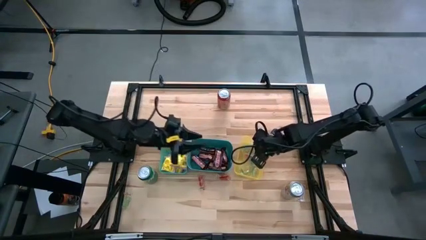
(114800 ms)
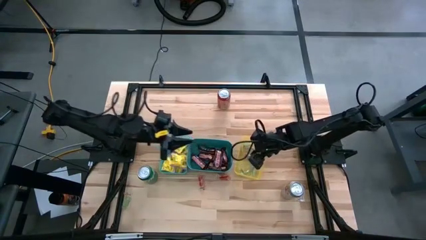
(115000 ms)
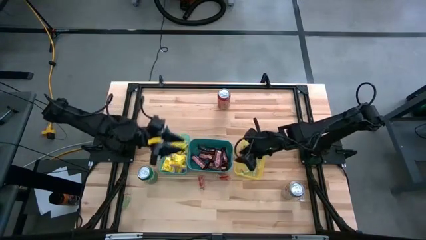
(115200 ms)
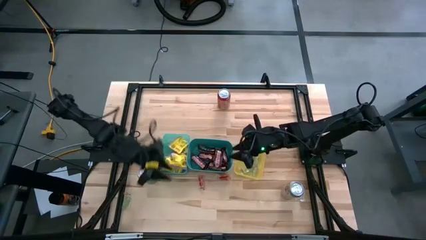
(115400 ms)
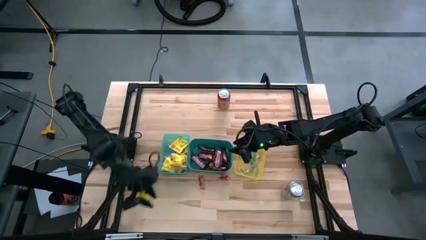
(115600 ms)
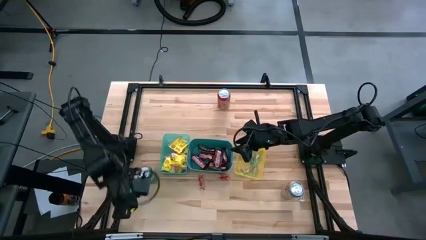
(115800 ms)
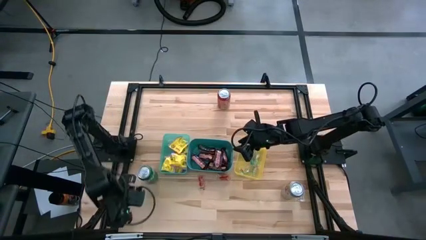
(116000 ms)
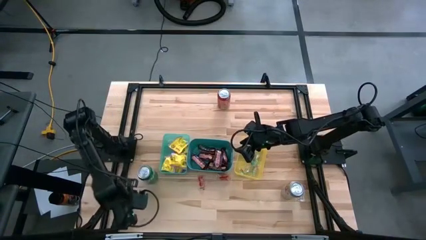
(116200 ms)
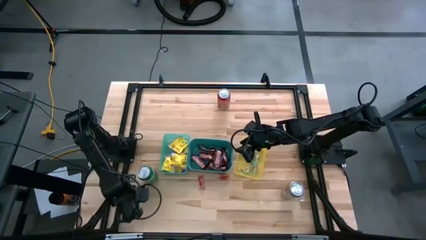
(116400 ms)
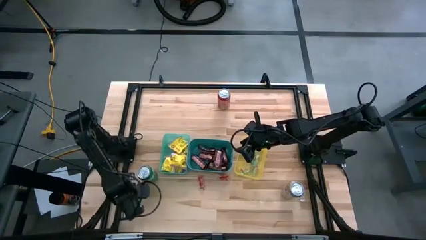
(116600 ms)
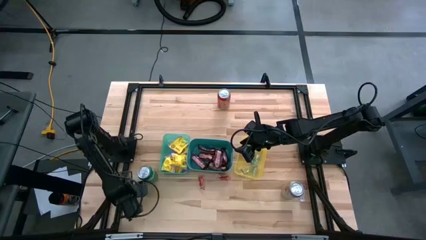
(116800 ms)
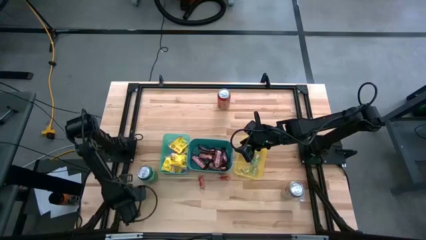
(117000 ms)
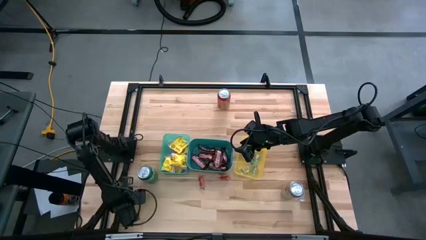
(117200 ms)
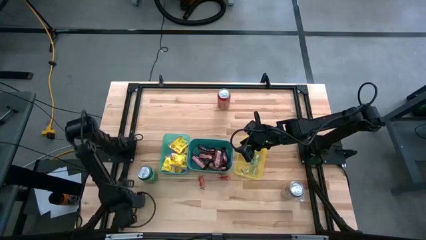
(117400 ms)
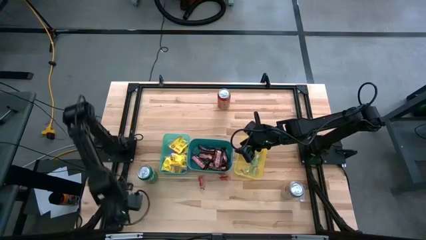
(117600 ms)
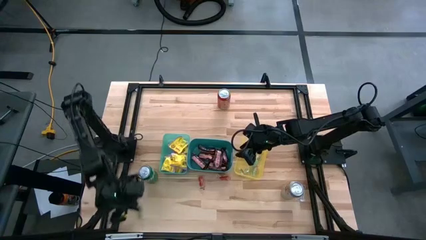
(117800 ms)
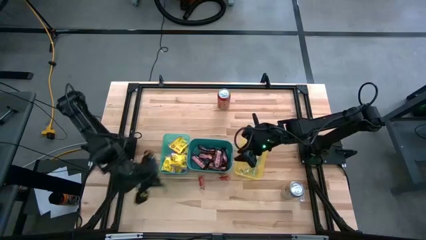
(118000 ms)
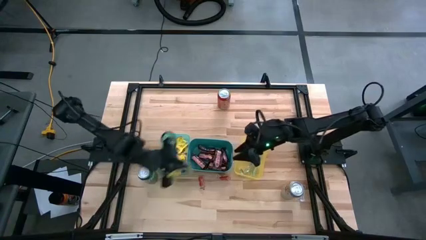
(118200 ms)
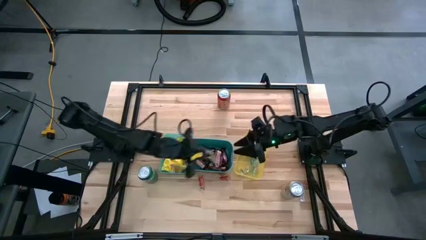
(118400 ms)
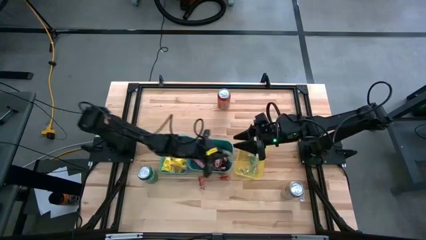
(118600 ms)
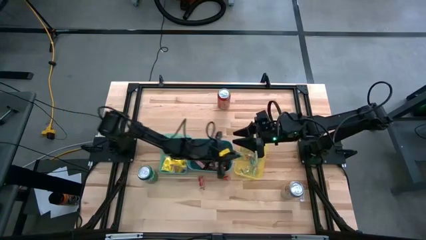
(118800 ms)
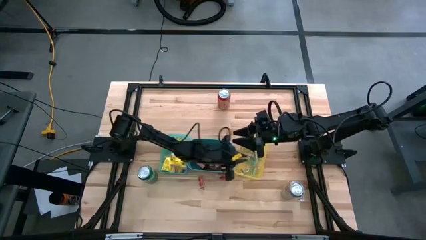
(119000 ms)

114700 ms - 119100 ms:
Task: Sort candy
Put the green gummy into the yellow bin

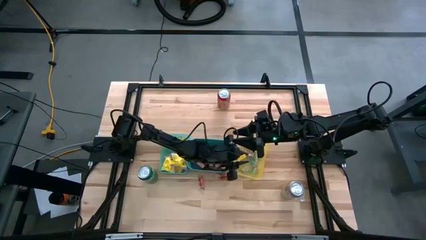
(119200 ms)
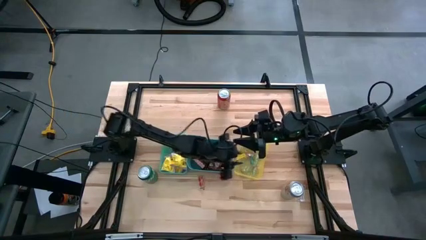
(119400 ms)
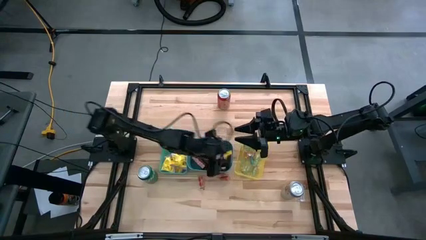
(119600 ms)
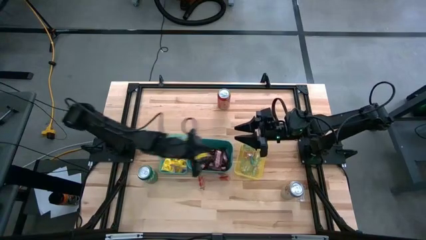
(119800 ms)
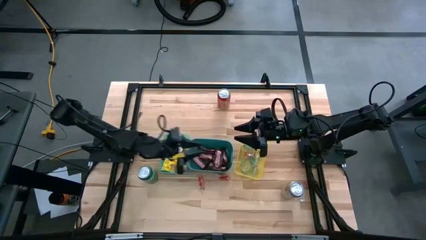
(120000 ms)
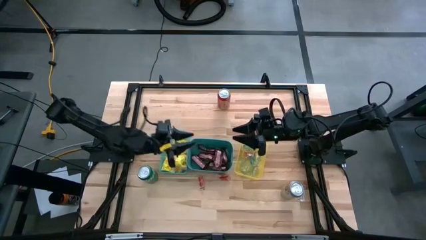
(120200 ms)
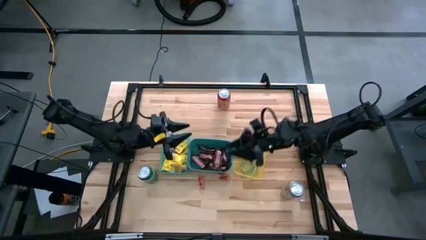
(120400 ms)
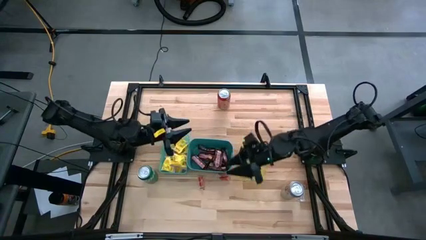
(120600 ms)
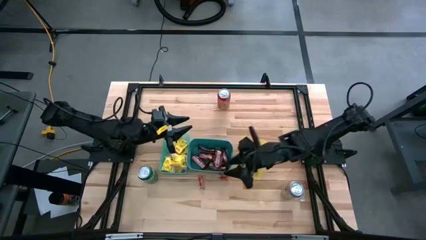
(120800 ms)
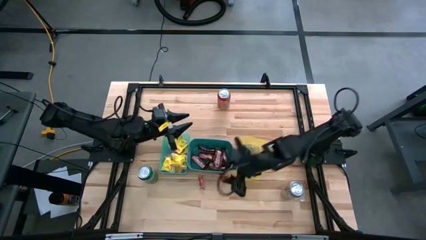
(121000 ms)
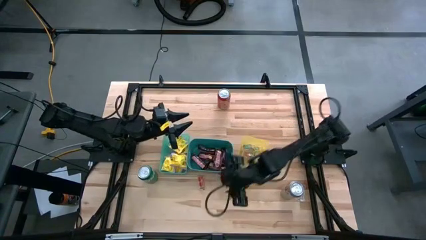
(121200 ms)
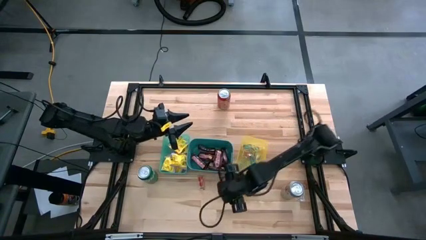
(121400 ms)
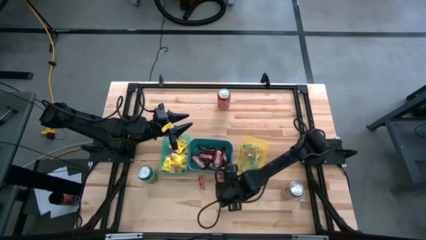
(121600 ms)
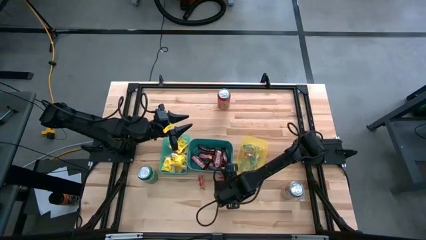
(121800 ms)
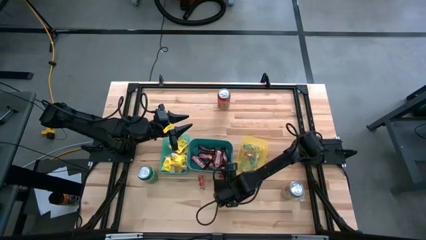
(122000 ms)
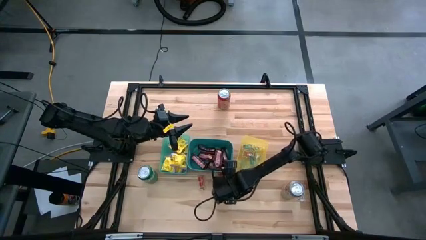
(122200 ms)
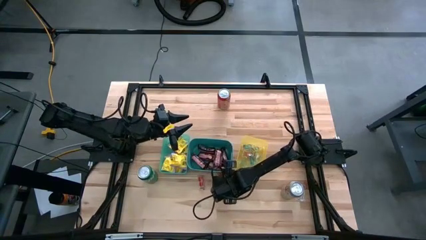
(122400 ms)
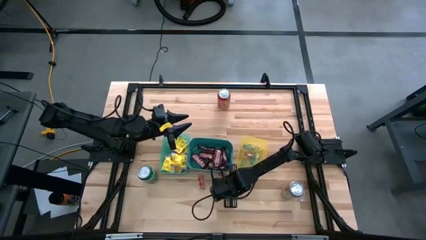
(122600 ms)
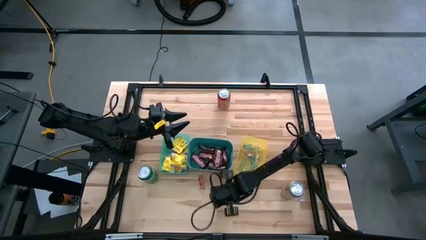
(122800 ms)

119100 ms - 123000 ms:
Put the red gummy into the yellow bin

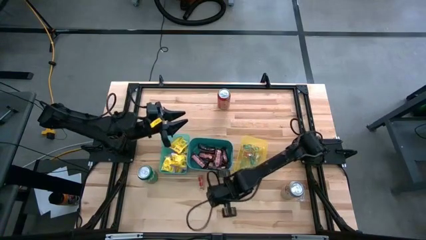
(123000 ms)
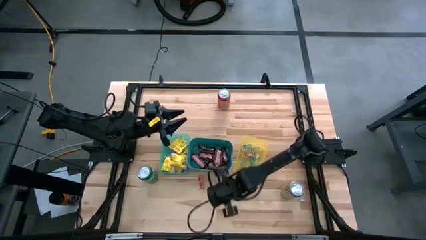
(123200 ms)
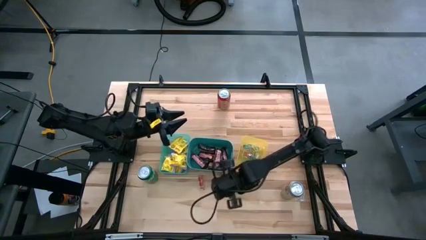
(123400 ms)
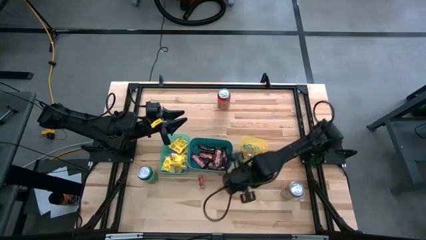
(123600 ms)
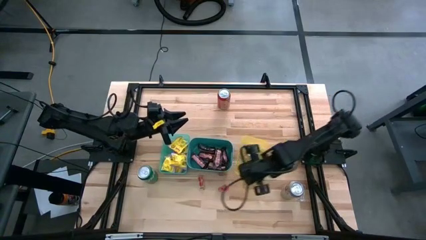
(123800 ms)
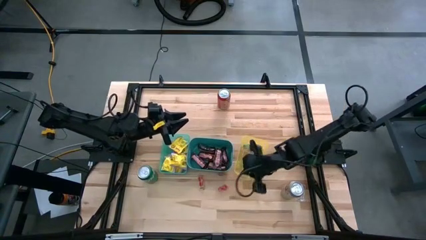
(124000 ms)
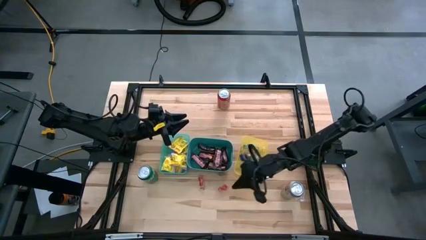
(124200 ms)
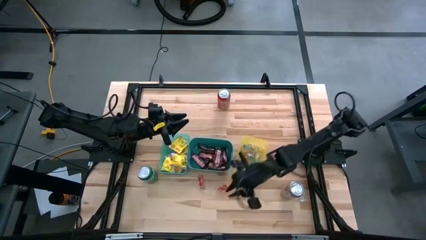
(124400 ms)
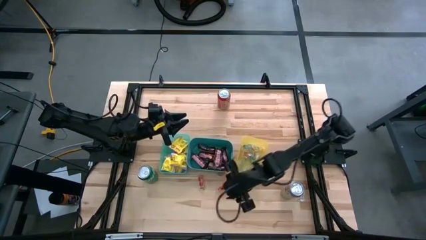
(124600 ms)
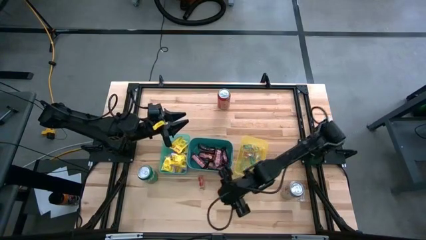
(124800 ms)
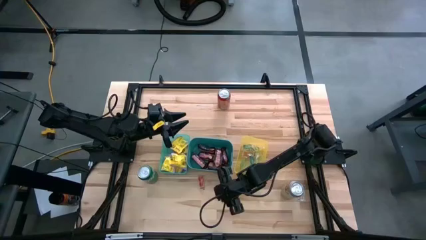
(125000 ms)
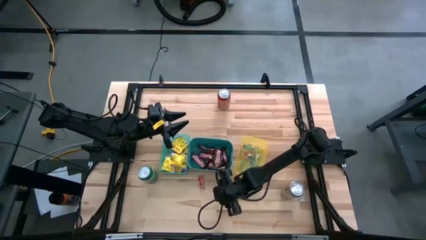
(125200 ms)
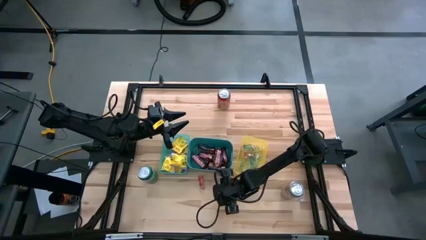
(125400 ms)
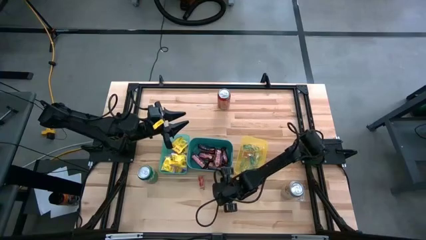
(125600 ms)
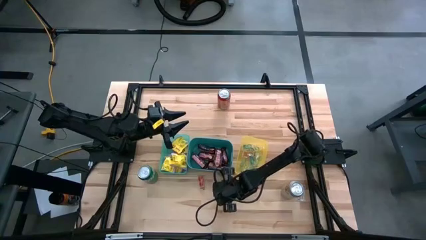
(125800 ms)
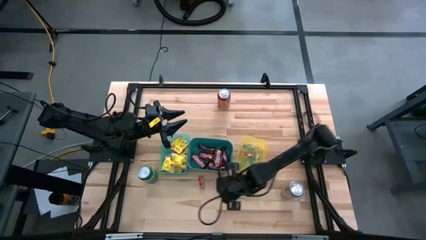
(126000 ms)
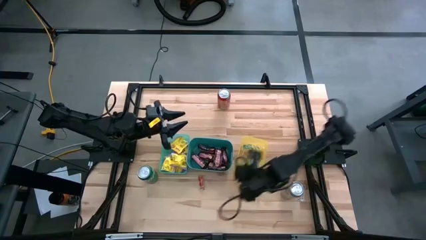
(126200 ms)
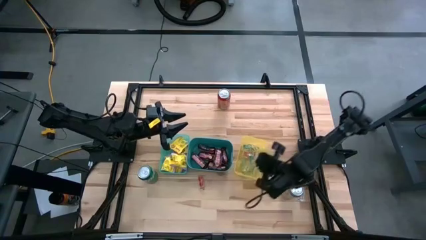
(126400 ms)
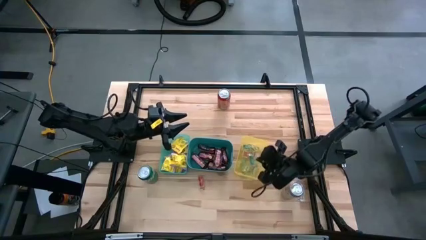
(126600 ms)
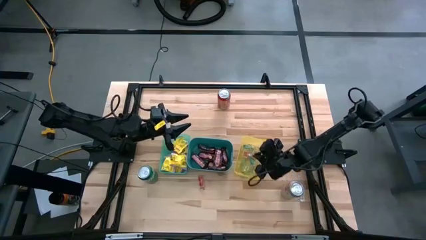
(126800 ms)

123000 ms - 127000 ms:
Put the red gummy into the yellow bin

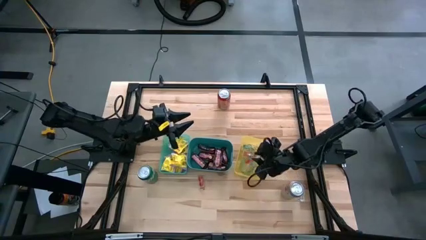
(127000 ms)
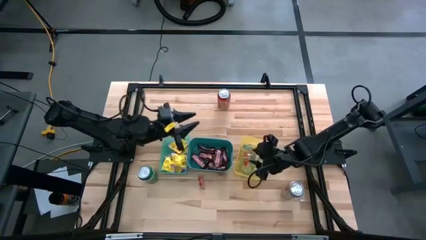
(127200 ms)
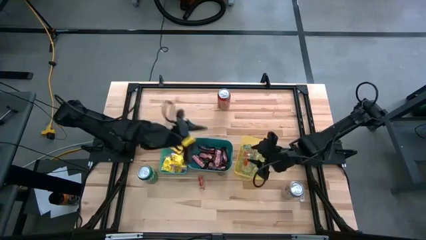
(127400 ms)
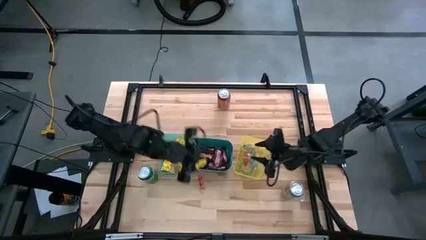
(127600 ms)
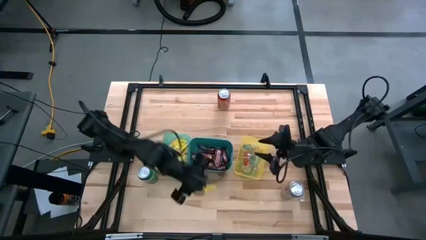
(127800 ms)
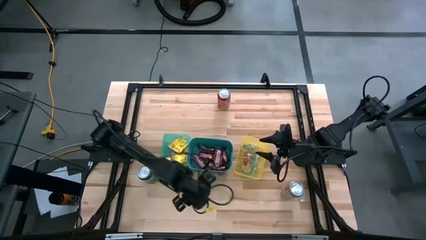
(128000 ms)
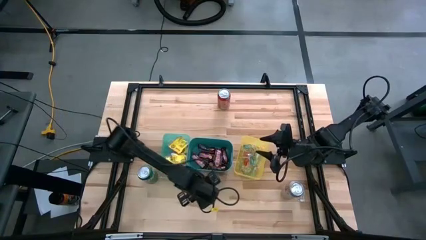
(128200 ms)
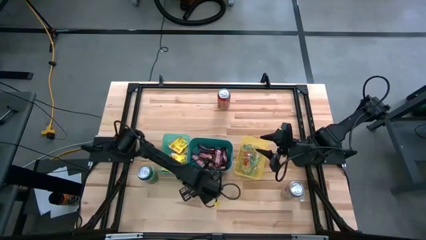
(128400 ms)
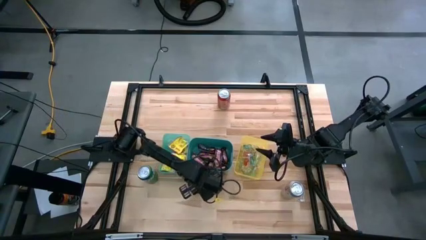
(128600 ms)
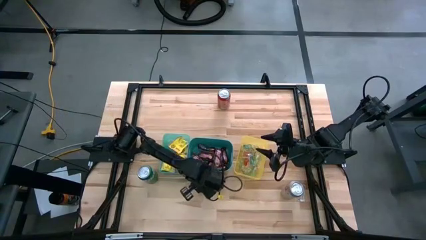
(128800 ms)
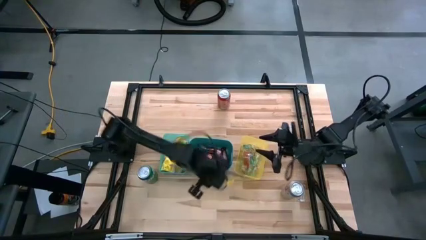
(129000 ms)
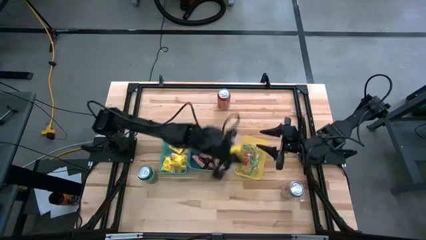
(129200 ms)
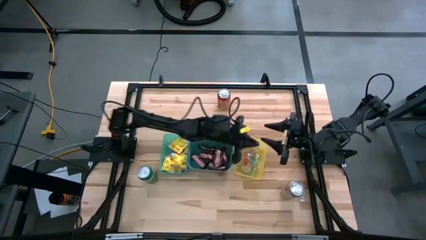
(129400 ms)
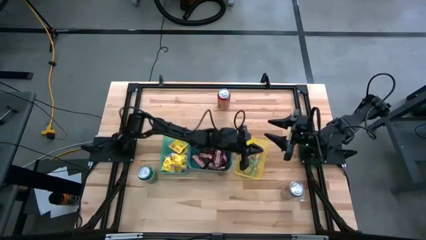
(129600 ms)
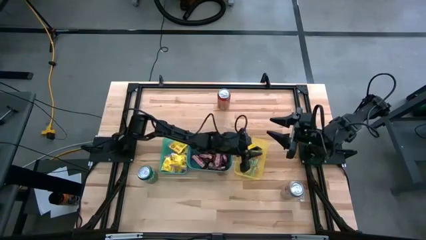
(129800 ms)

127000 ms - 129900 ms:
Put the red gummy into the yellow bin

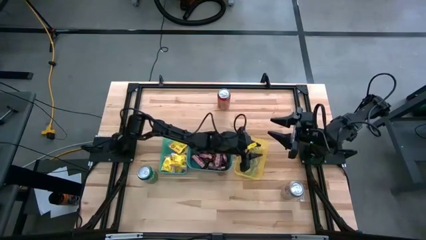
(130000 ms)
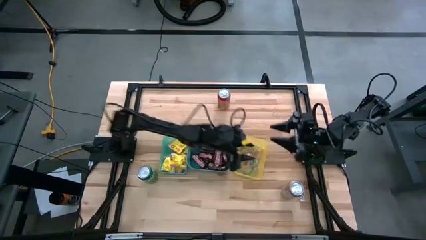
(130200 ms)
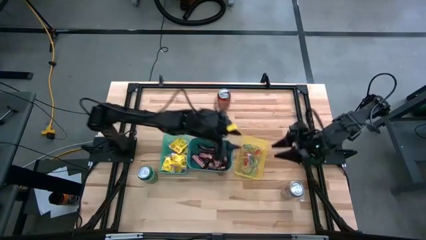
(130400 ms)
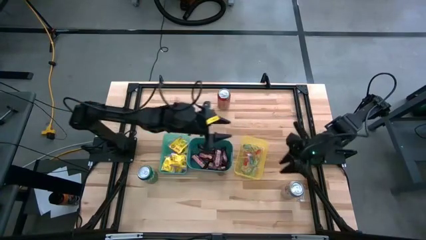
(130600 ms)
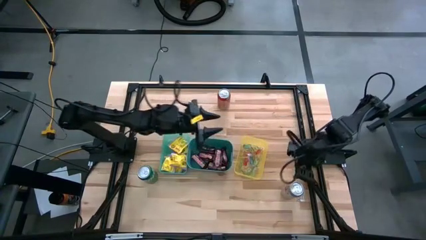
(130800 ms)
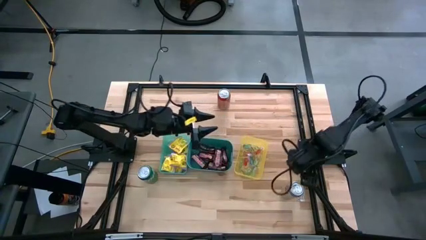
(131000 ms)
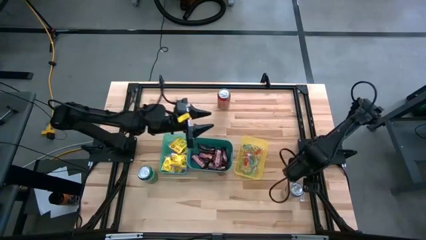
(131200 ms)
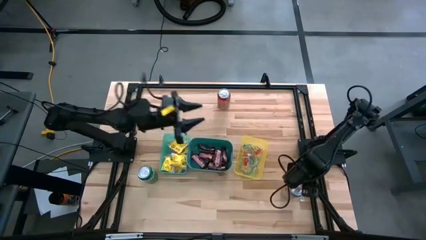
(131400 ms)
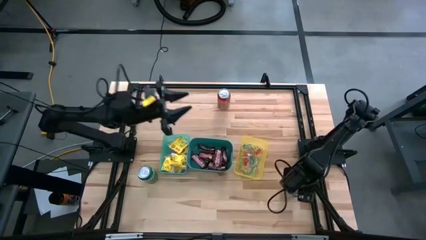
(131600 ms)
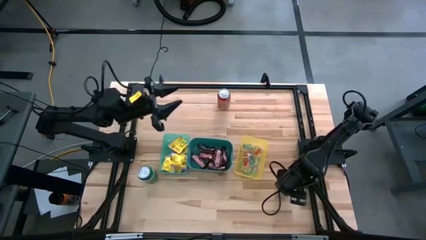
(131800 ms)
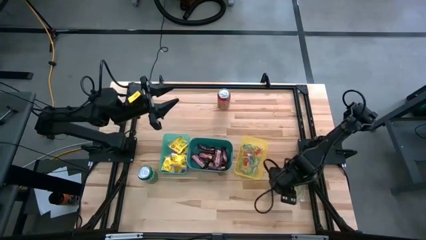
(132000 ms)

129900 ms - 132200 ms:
Adjust the red-silver soda can
